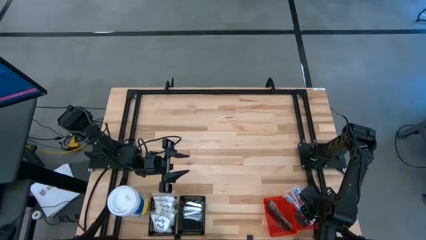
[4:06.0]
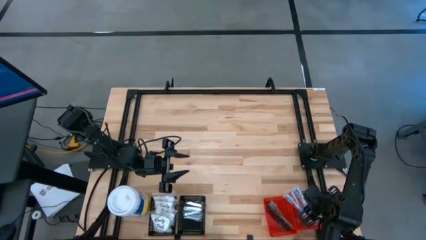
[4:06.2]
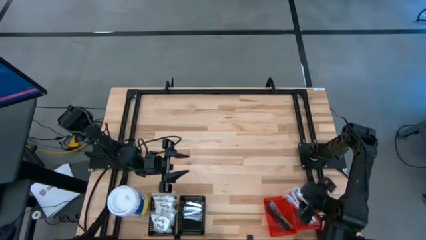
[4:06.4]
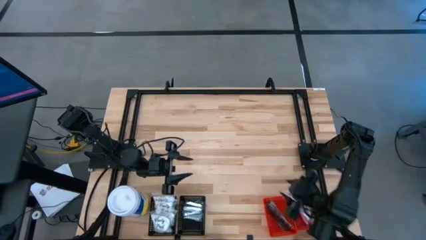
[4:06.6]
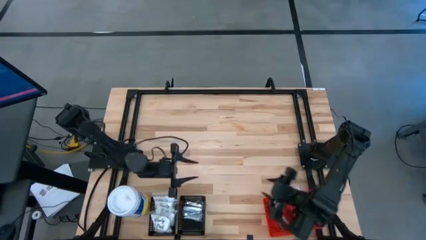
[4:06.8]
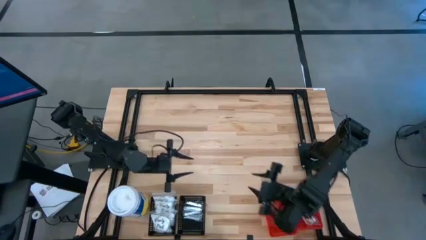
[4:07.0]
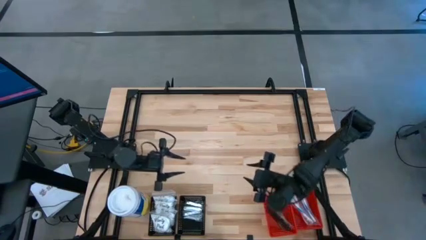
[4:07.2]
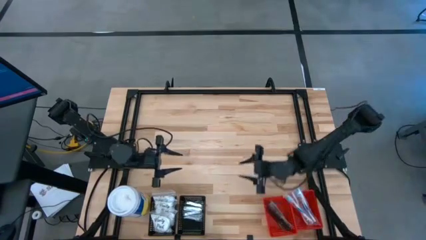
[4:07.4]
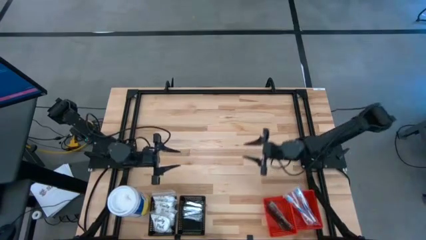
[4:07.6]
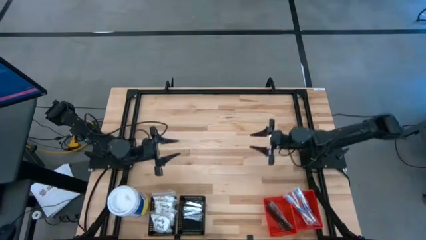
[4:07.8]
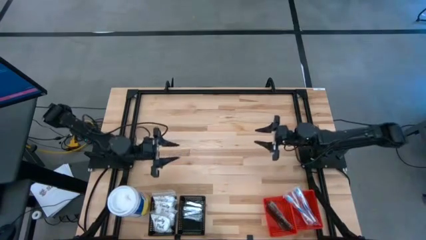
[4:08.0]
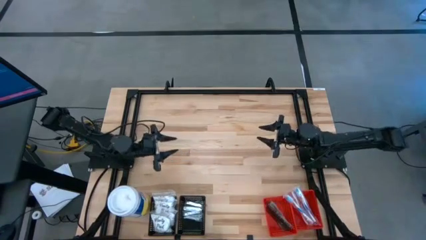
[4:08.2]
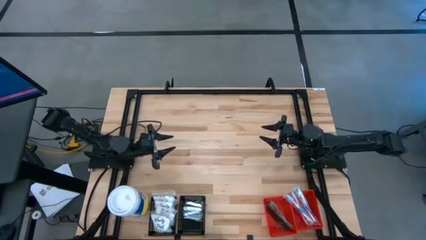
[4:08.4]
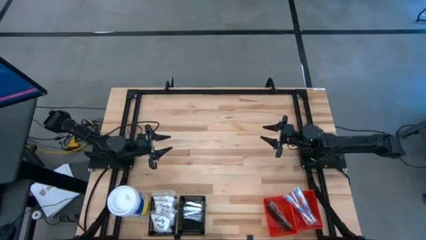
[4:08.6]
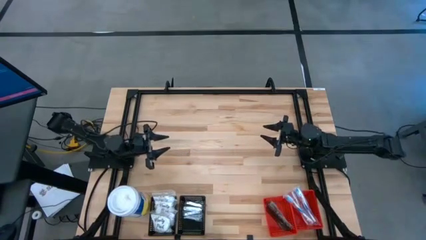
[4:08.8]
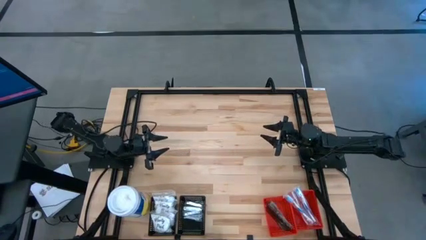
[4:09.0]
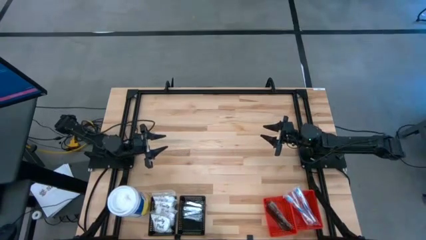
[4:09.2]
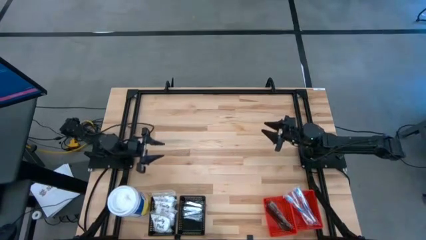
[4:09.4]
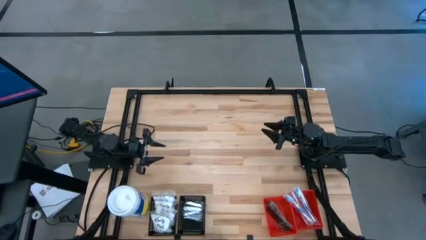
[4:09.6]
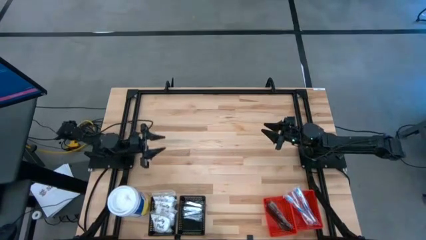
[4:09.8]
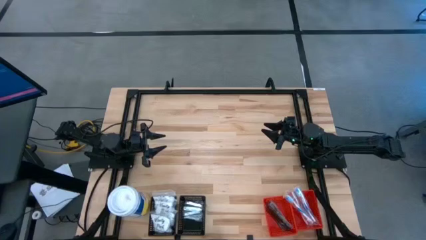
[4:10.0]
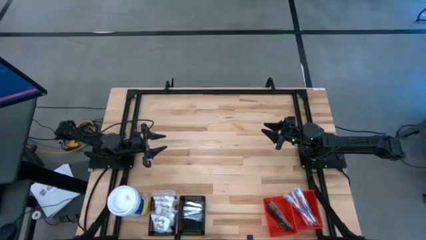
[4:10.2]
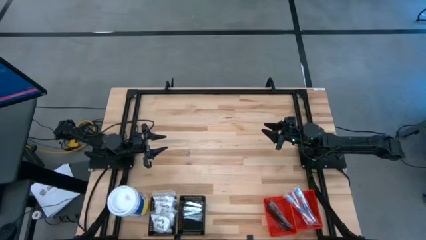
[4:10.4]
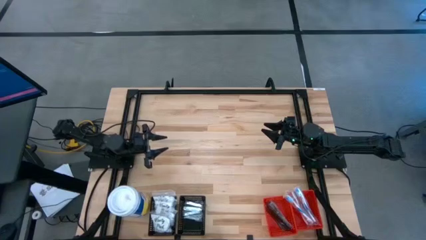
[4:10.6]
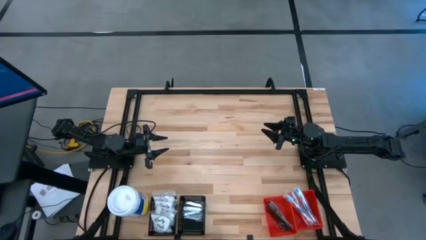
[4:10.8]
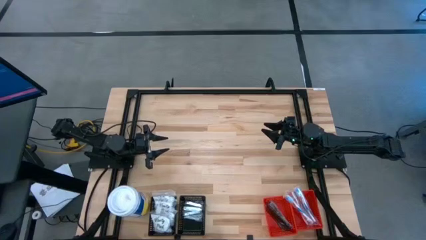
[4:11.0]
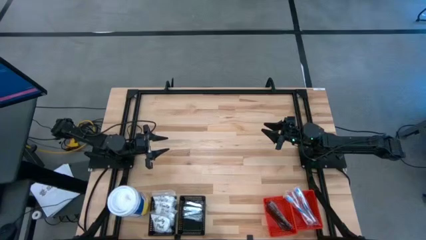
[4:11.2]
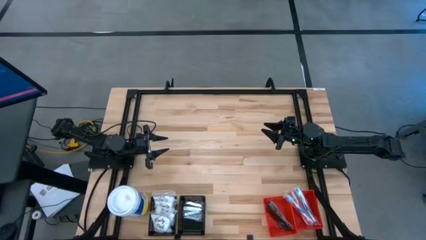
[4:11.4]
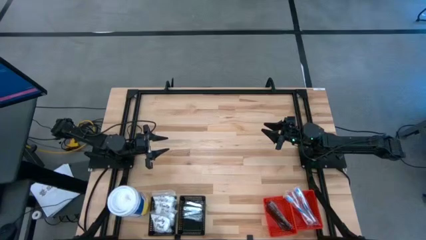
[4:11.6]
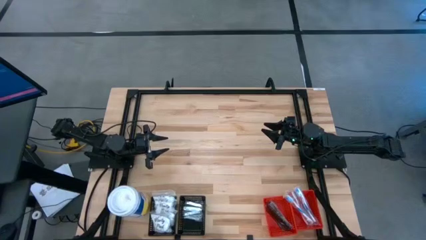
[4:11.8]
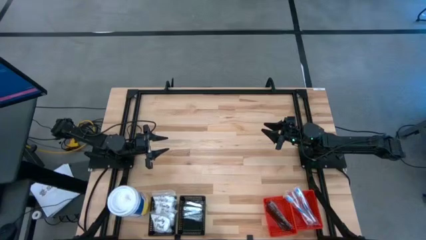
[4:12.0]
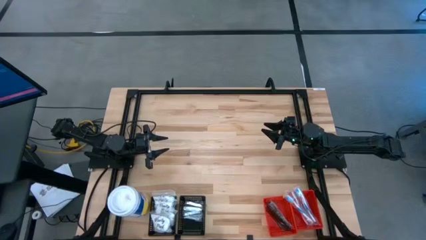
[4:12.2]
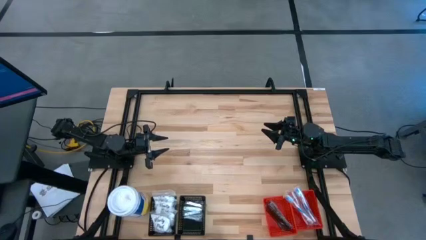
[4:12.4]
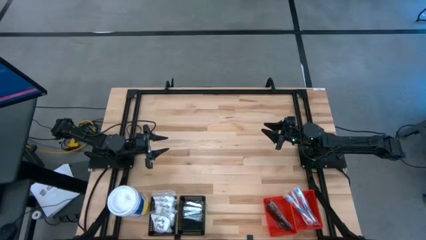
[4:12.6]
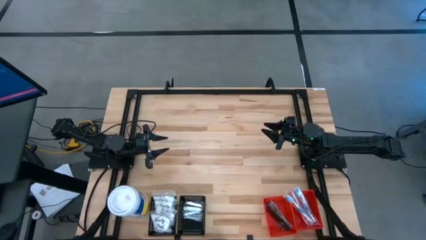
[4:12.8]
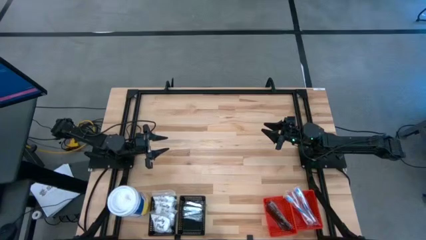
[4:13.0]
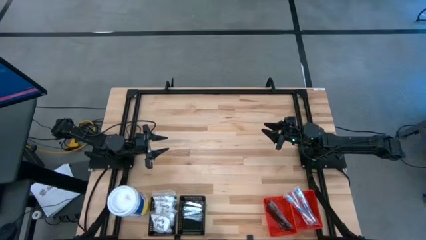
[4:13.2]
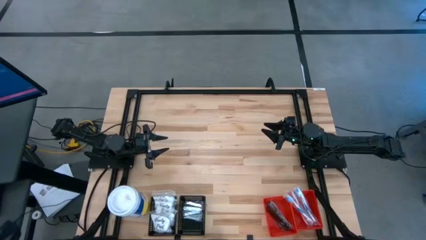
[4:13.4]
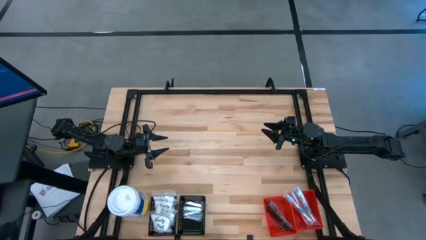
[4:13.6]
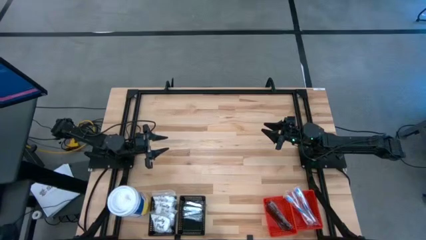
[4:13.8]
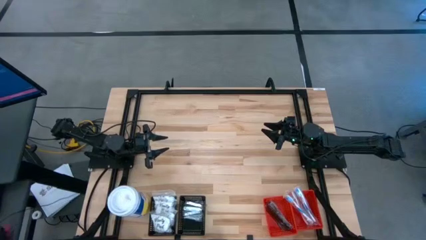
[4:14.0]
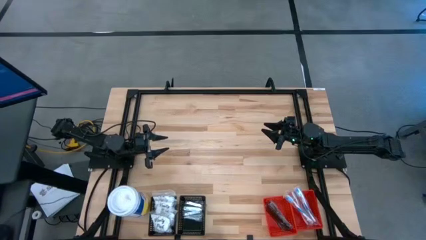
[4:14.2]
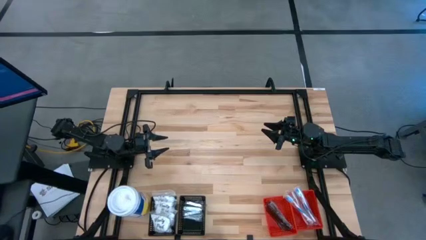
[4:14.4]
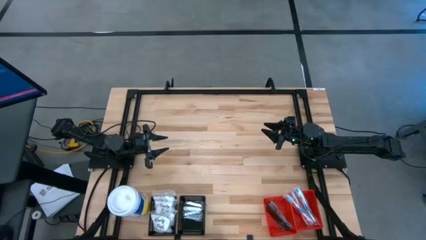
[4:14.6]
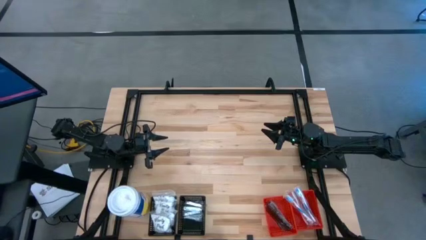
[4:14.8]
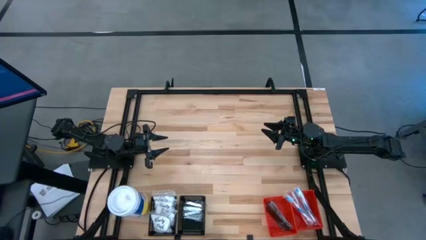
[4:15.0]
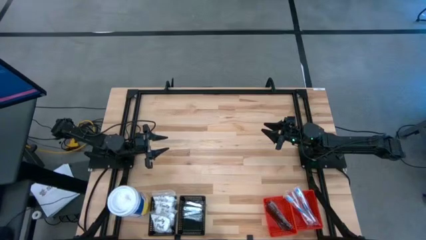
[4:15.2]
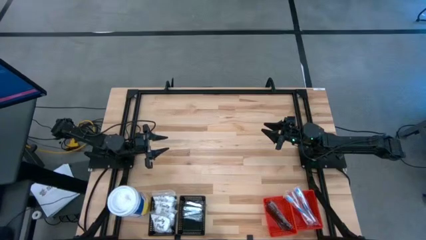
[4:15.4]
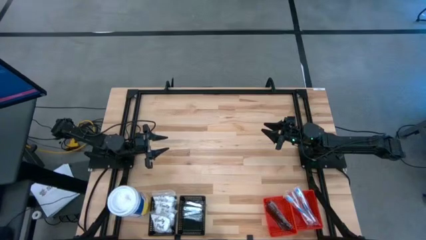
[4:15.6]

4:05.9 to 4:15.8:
Task: Pick & Place Travel size toiletries
Return to Home Position

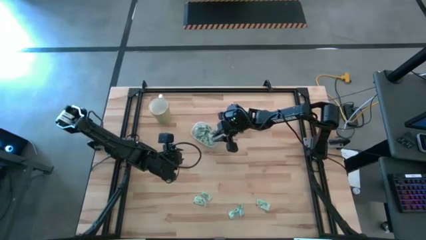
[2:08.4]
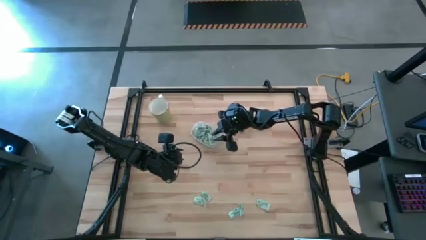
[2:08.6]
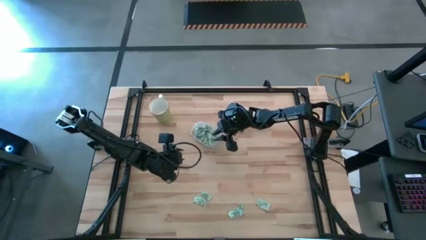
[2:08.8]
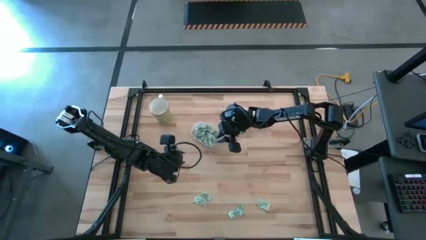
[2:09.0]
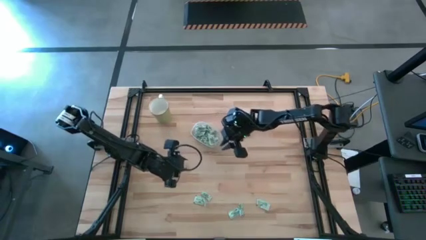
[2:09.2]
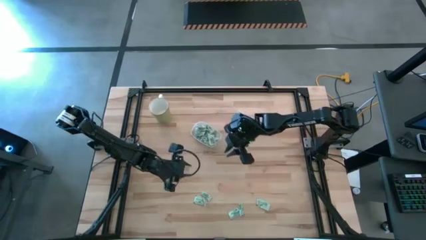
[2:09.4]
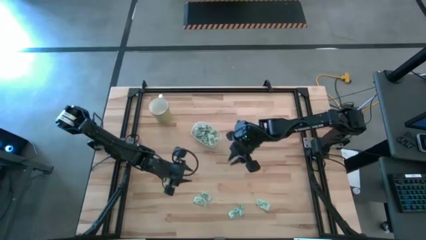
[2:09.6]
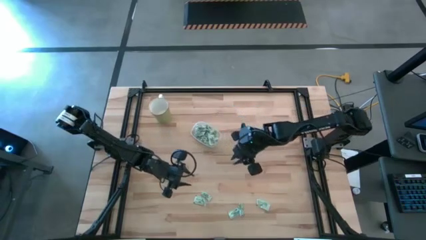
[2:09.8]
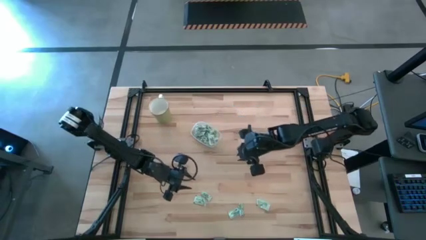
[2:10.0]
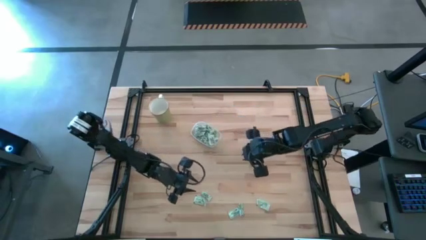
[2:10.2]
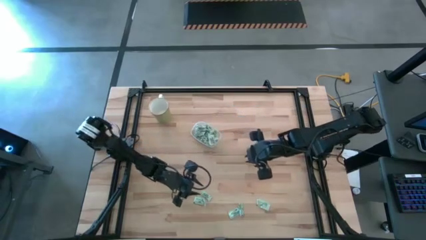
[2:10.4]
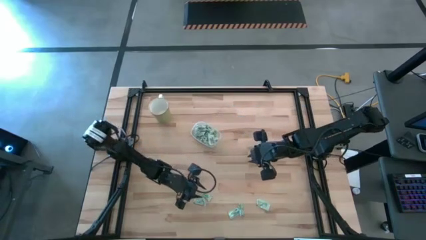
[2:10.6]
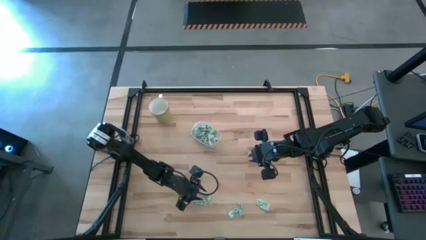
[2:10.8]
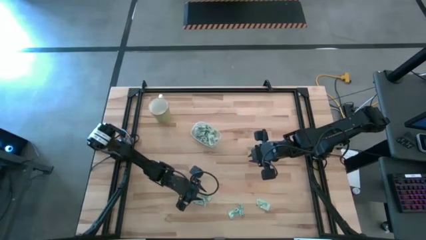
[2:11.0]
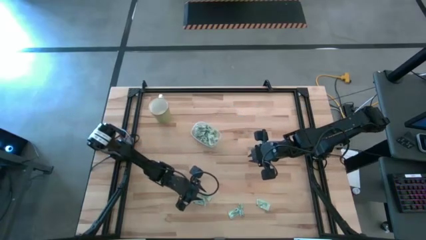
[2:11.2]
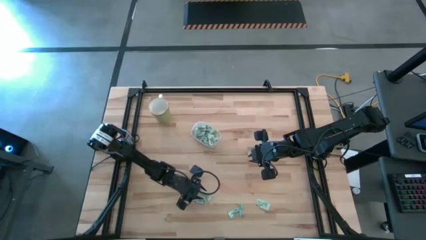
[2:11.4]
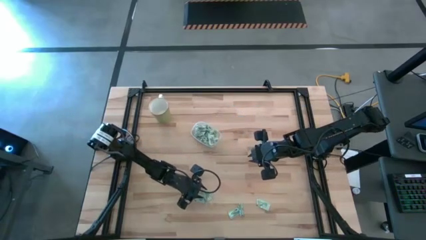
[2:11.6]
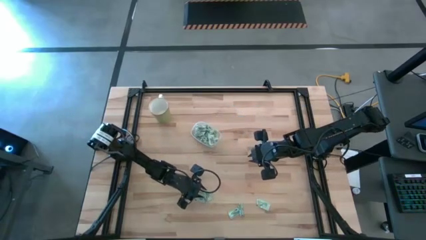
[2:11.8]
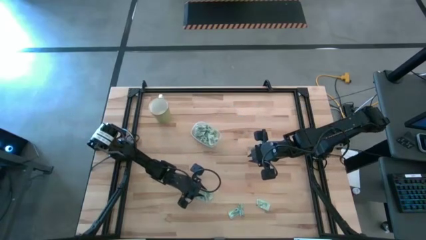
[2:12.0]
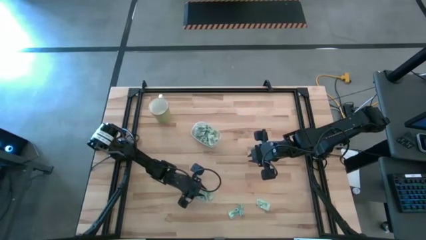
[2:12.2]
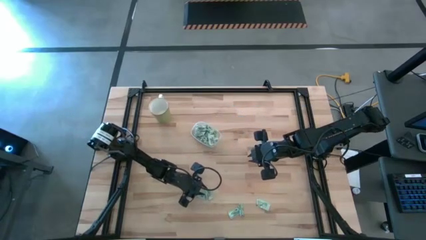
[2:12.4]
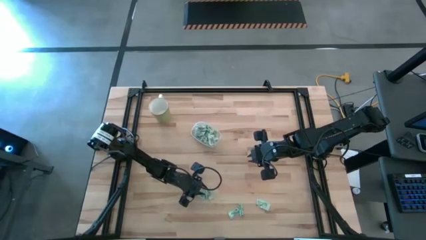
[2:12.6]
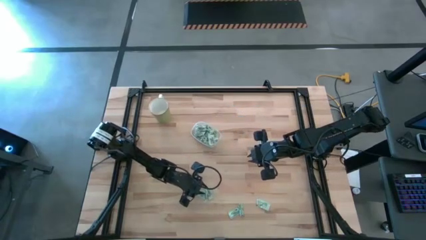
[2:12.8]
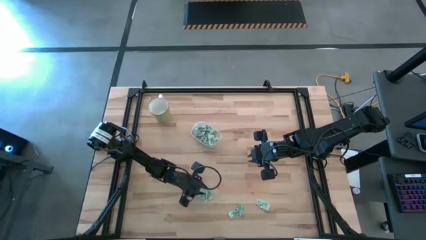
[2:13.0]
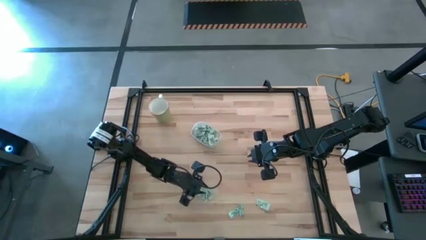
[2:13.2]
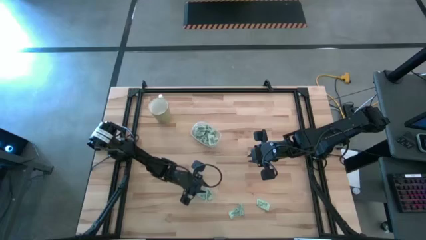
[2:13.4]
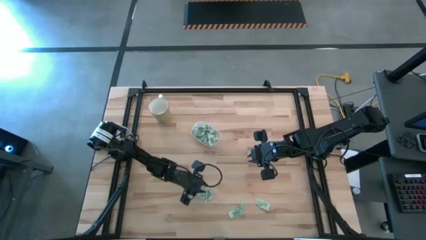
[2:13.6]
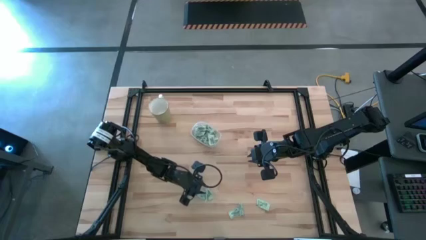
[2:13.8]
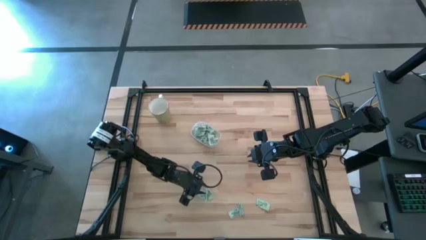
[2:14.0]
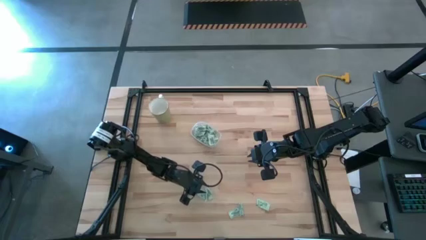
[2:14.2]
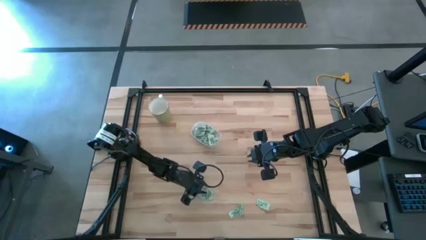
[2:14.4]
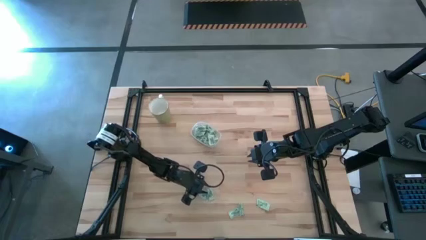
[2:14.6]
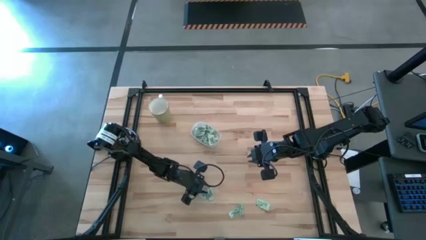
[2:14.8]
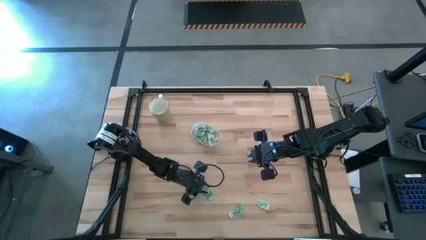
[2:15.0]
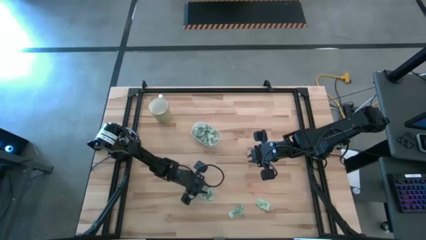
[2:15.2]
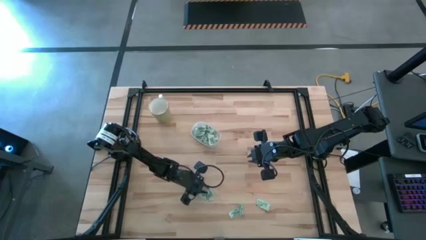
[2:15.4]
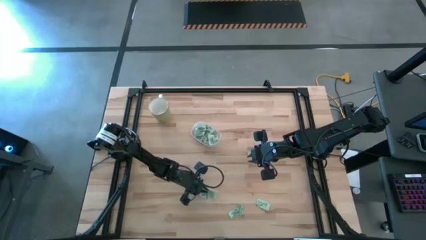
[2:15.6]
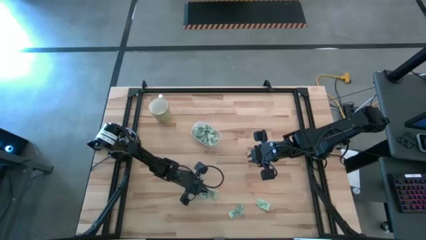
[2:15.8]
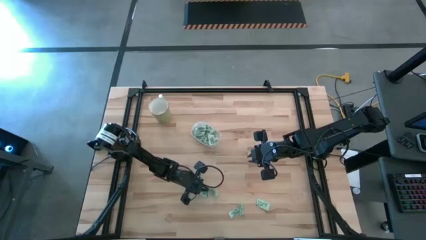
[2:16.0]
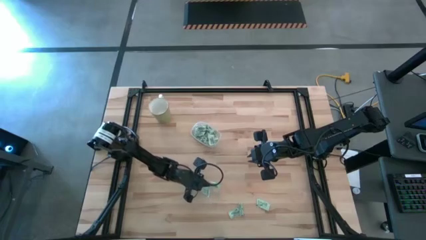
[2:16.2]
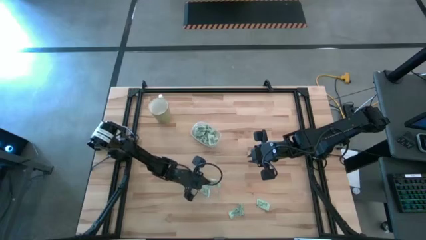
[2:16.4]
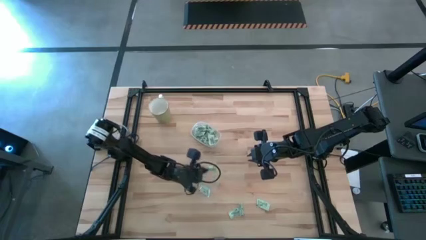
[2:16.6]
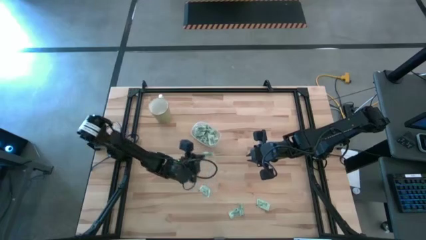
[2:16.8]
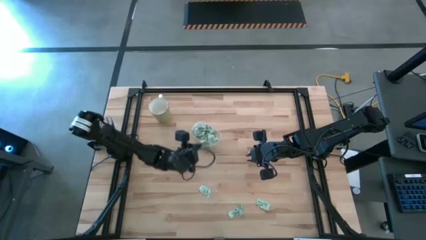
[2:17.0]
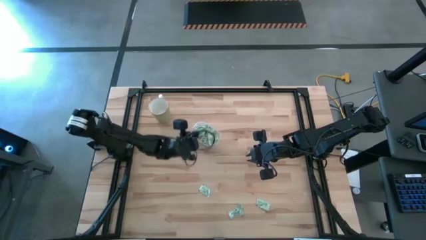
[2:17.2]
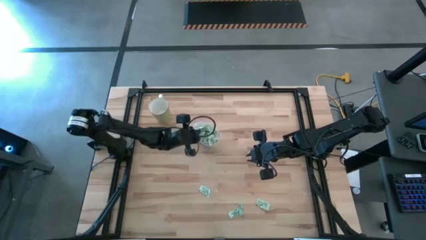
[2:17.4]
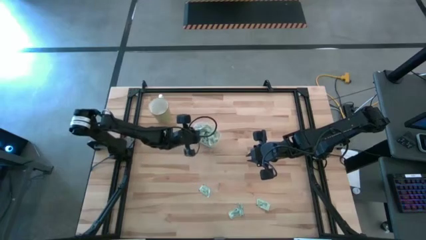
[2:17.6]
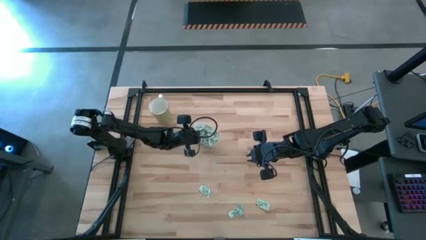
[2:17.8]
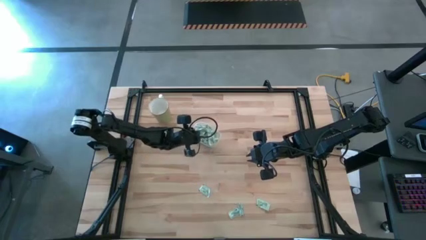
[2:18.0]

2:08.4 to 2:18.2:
Task: Pick and place Stevia / Truvia into bins
Put the stevia packet into the transparent container
